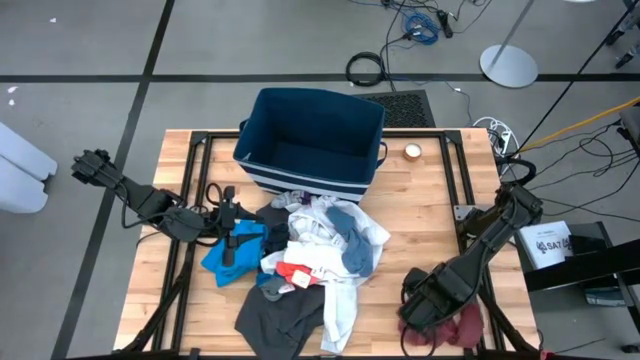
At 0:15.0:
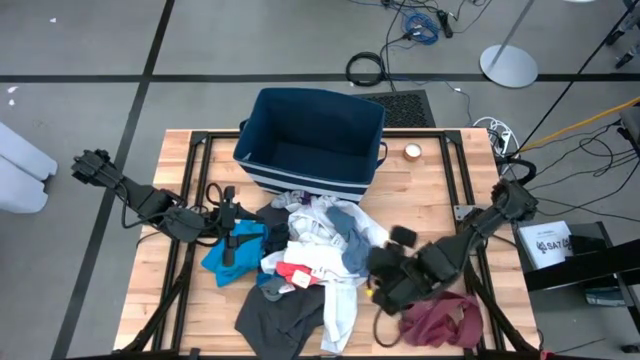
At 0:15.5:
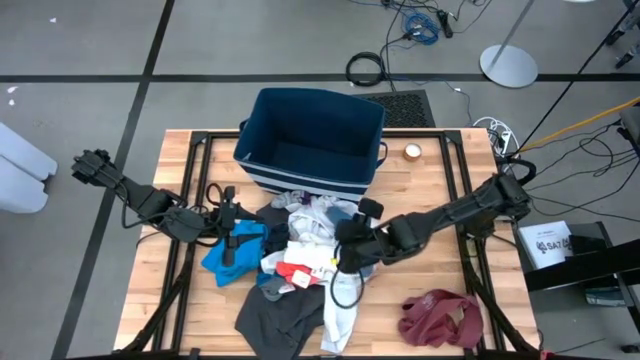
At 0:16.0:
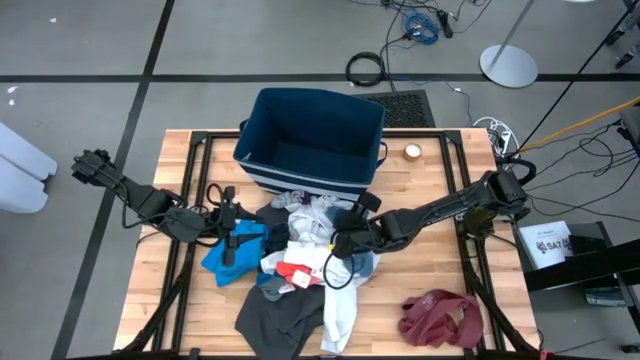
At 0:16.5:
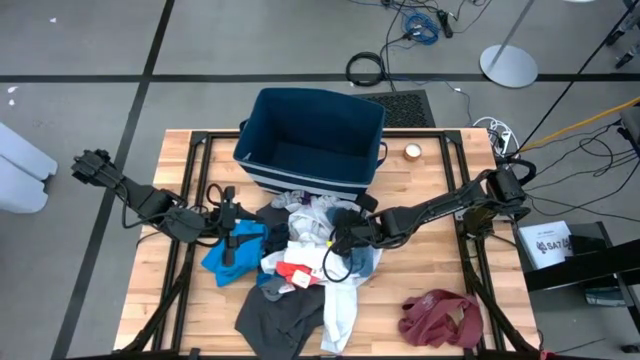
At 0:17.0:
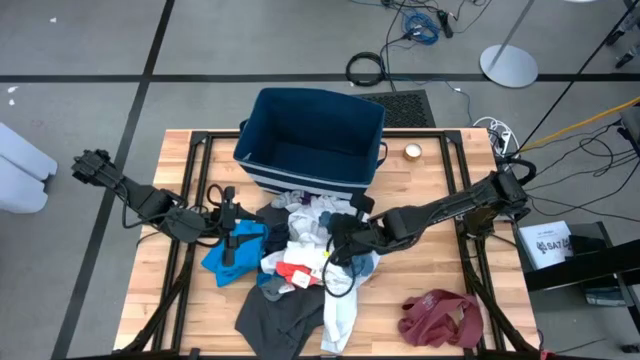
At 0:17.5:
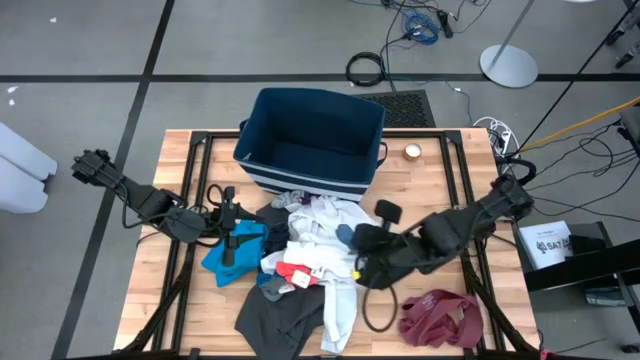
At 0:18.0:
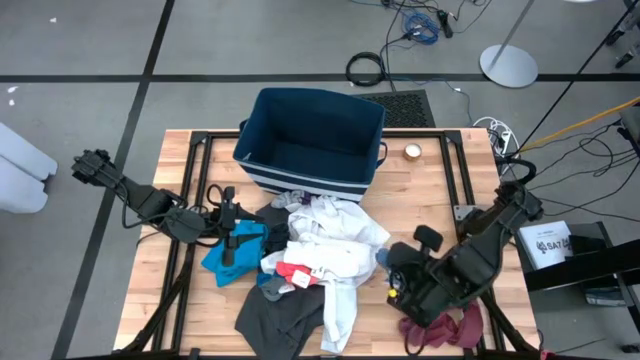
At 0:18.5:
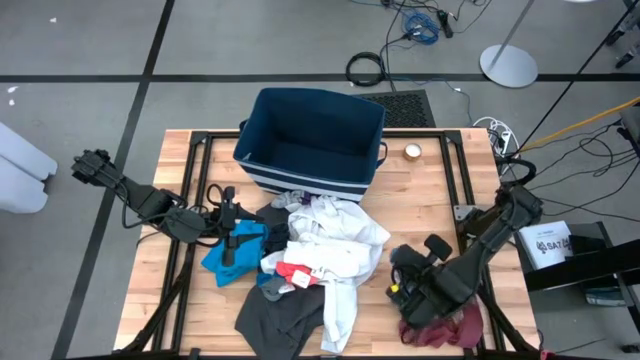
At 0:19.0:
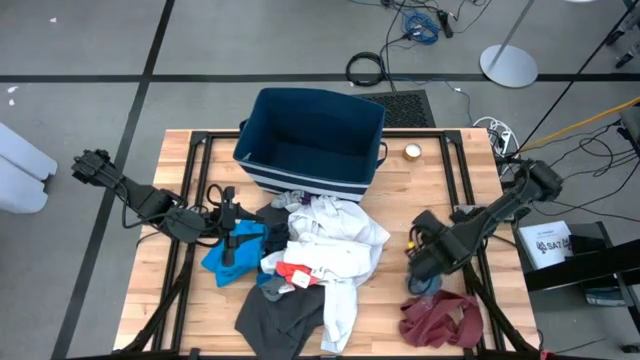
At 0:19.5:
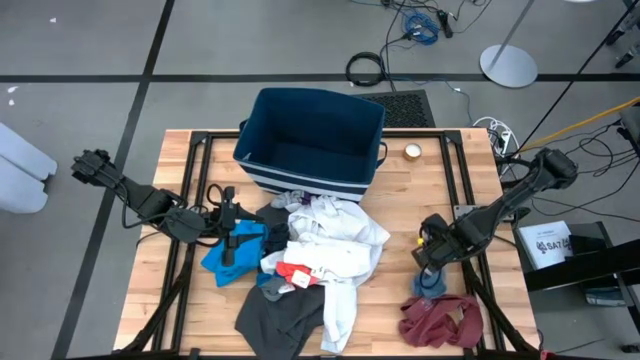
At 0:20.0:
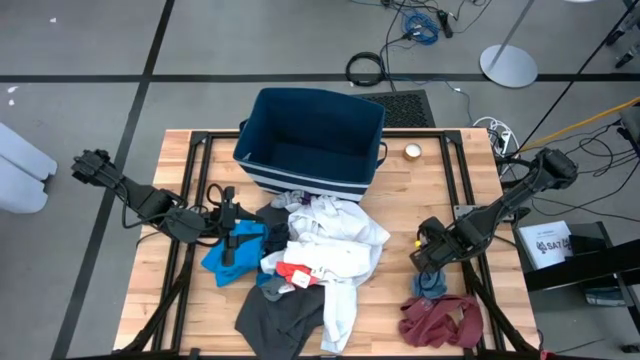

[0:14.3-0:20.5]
Task: Sort clothes
Move the blue sock to the right of the table

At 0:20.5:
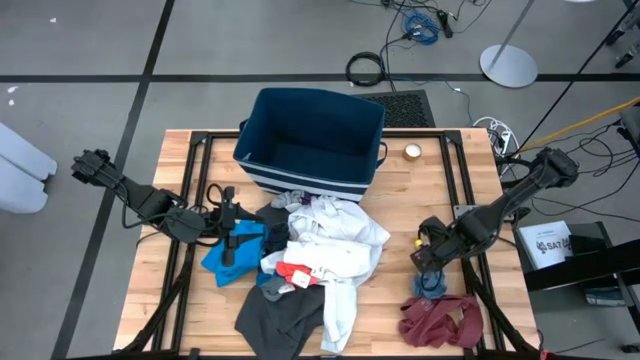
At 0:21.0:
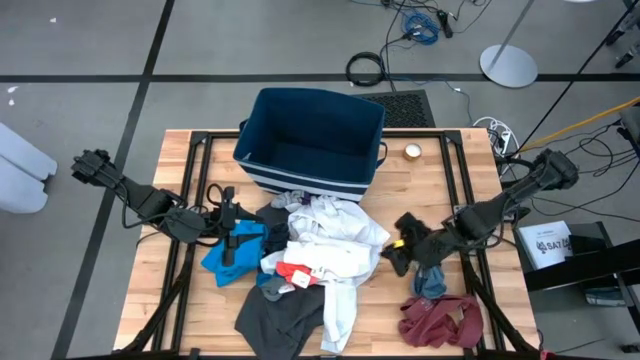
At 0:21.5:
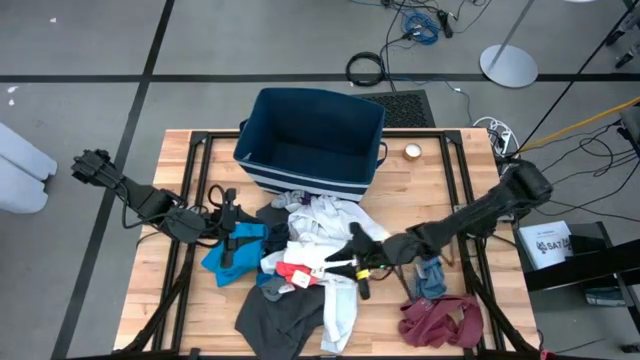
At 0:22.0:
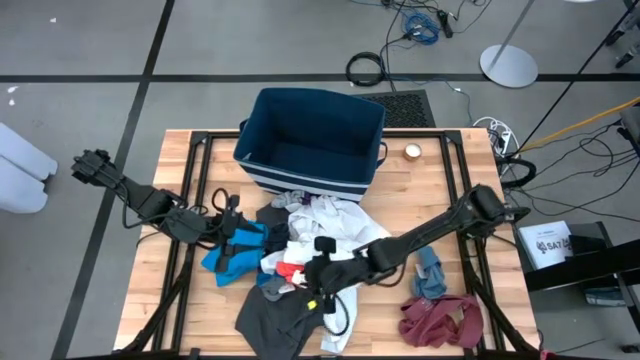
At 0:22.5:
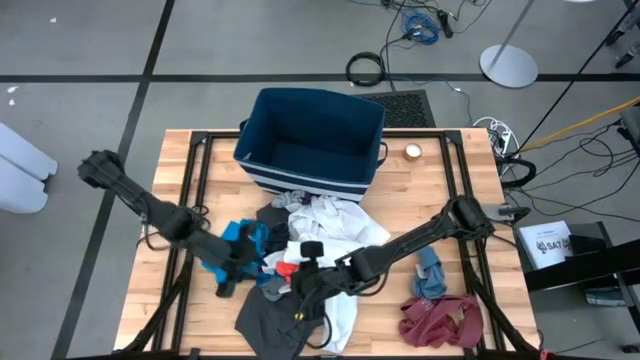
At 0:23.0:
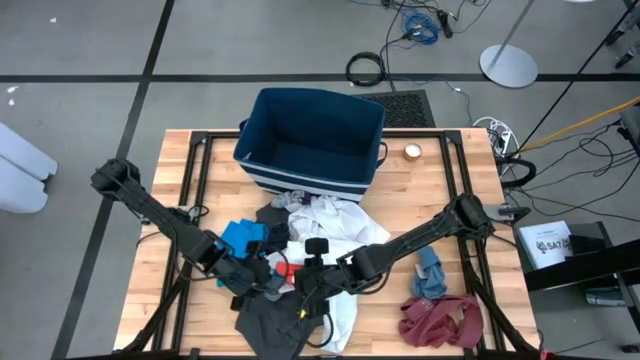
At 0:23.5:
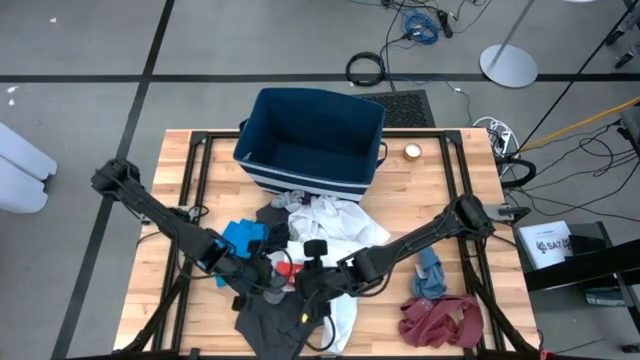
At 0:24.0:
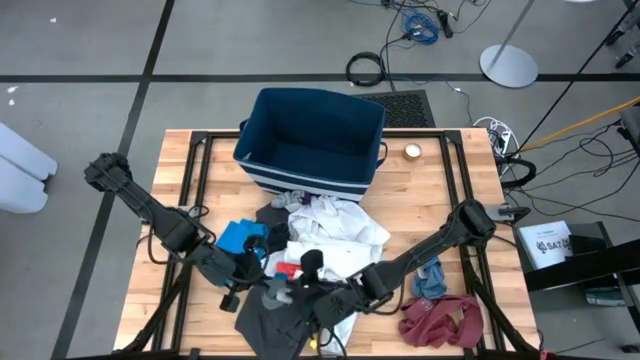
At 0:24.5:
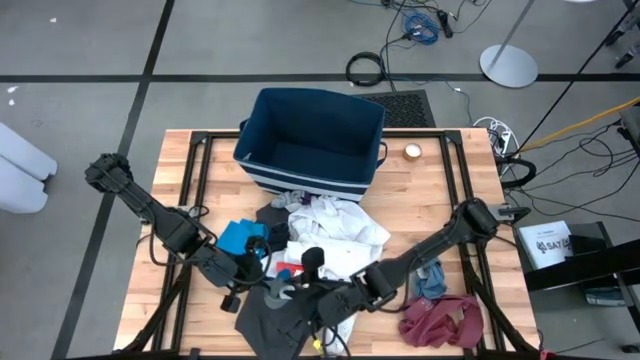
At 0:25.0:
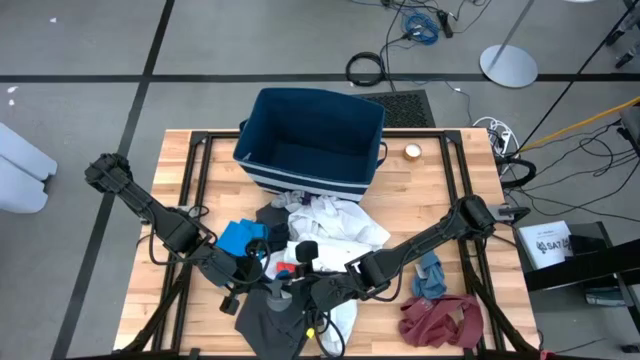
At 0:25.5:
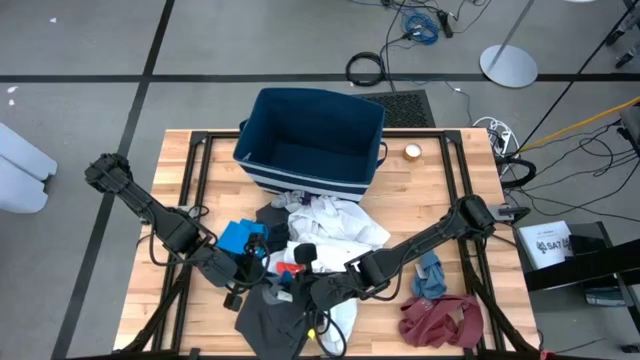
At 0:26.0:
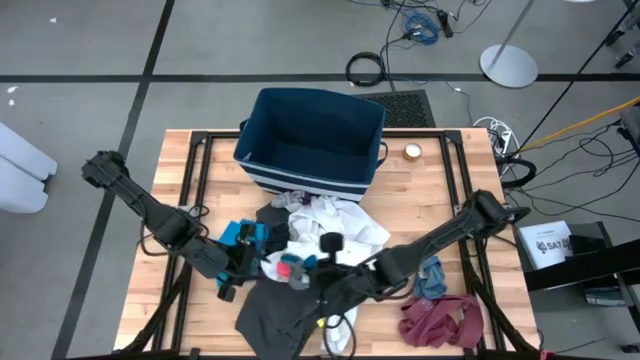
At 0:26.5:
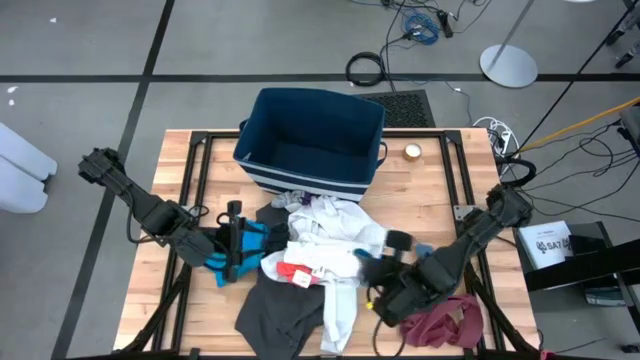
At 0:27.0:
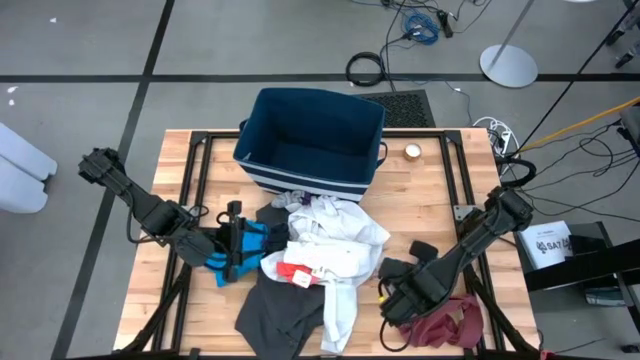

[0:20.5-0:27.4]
Move the blue and gray sock to the right of the table

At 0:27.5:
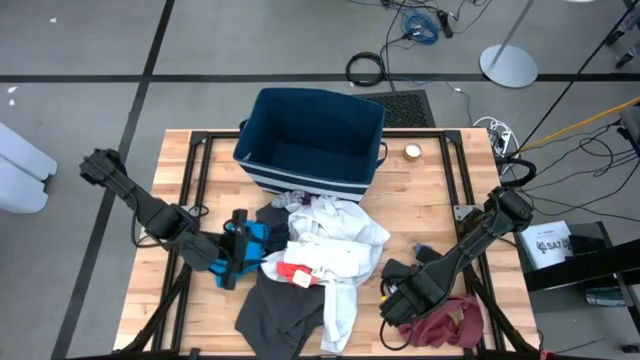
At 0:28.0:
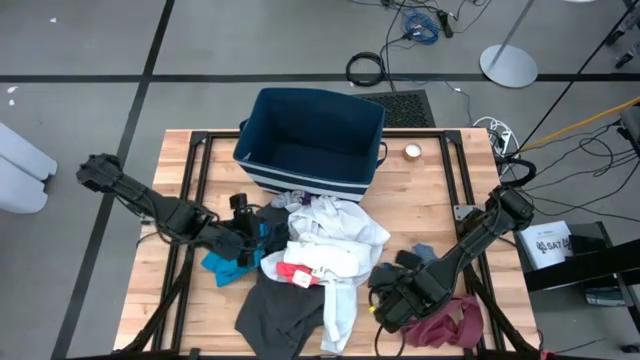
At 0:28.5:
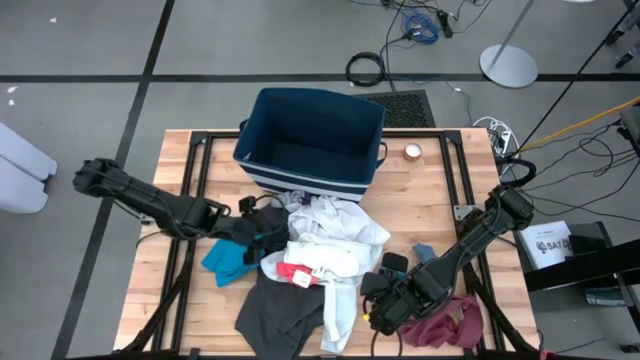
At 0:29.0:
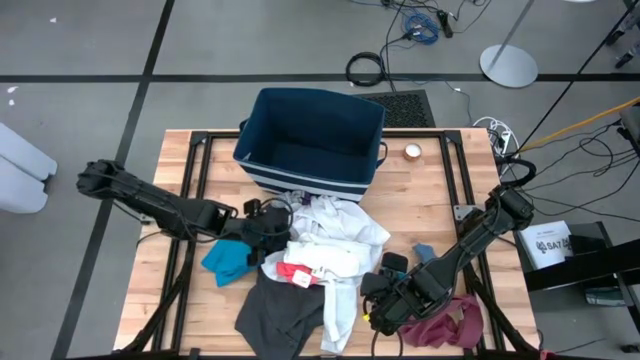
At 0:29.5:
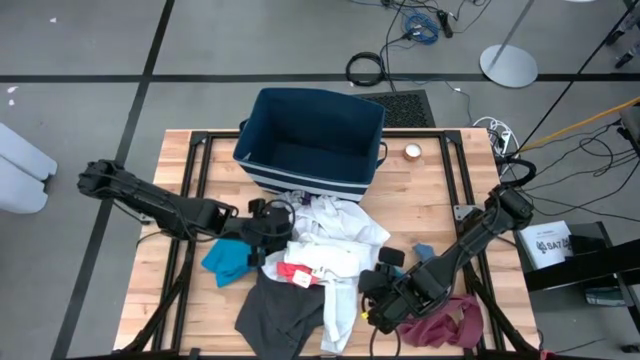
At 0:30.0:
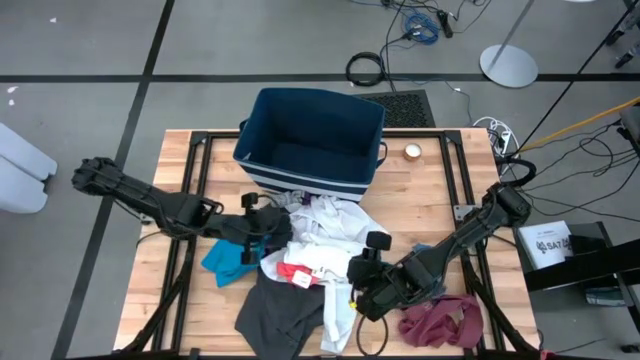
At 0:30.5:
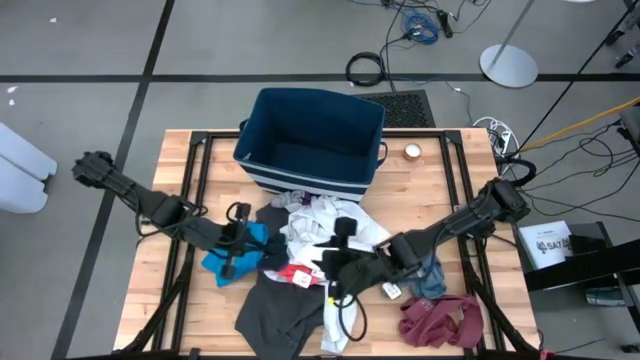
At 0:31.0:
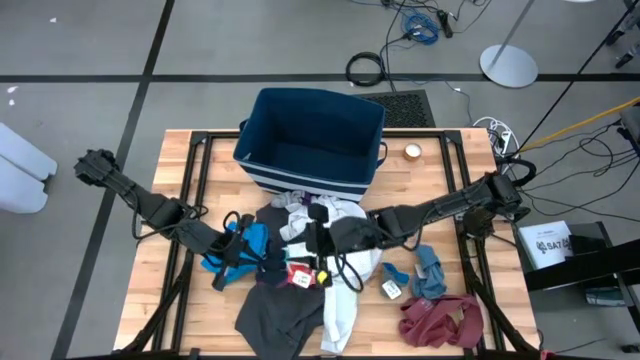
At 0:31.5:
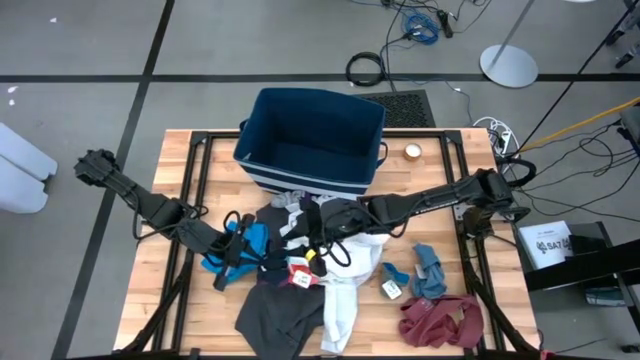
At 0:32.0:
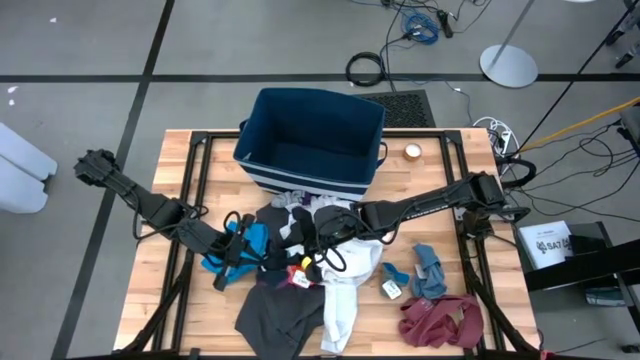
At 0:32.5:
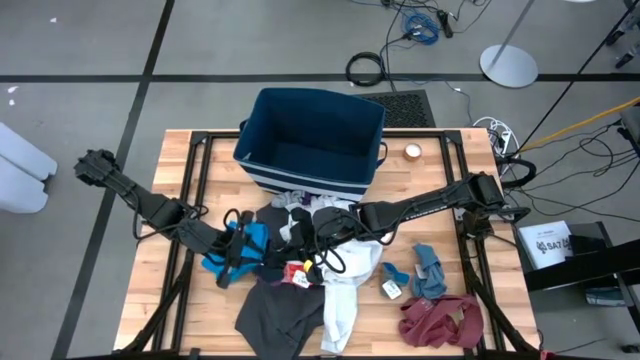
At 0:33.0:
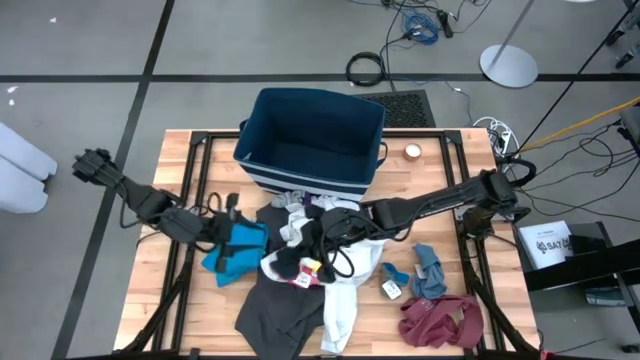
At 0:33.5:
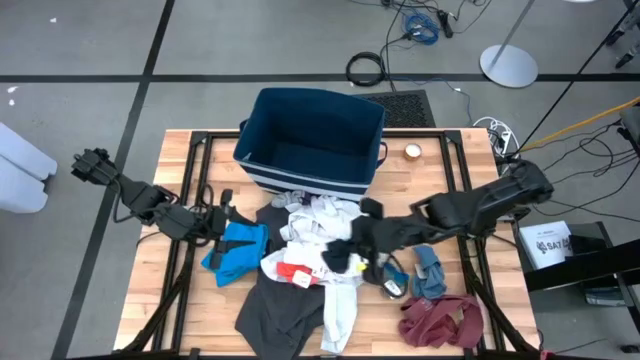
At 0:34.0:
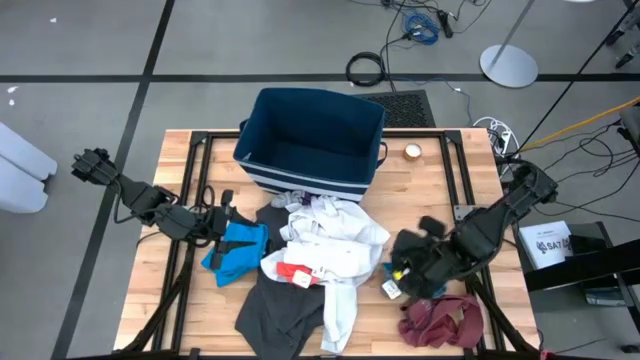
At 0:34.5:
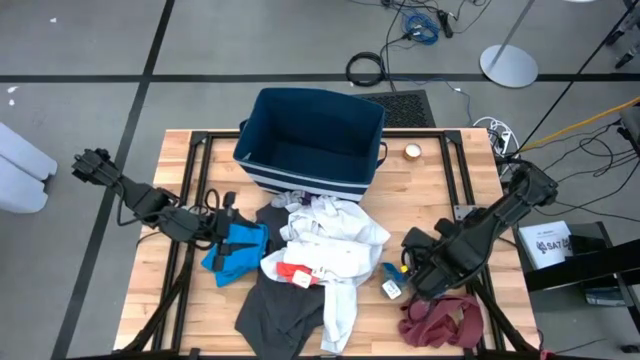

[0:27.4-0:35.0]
Move the black sock to the right of the table
